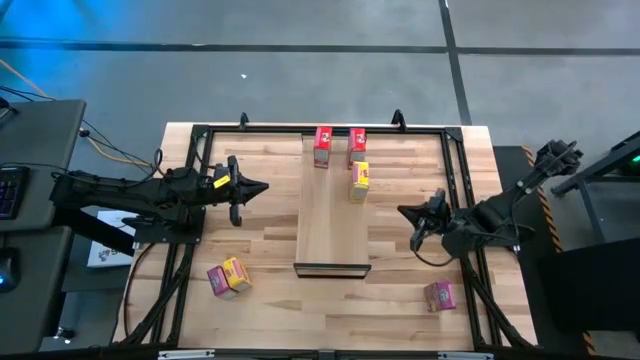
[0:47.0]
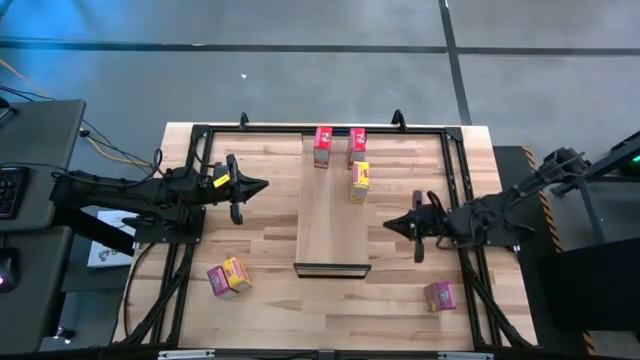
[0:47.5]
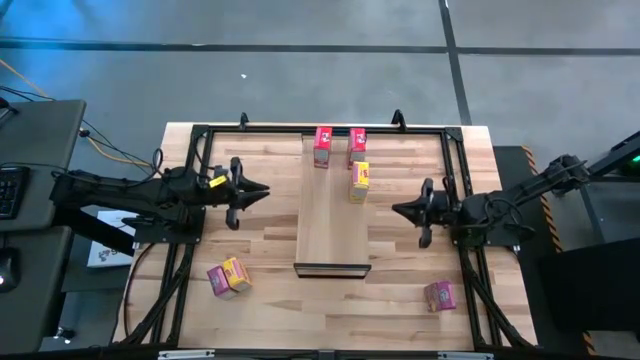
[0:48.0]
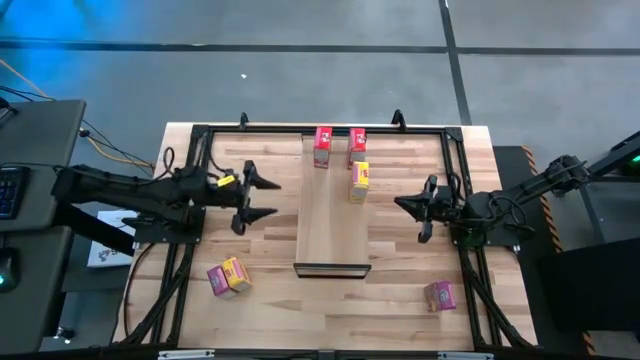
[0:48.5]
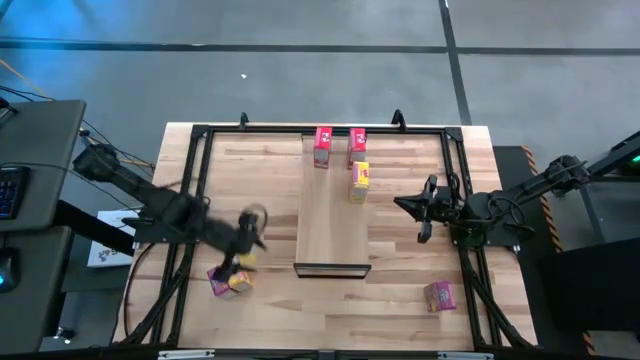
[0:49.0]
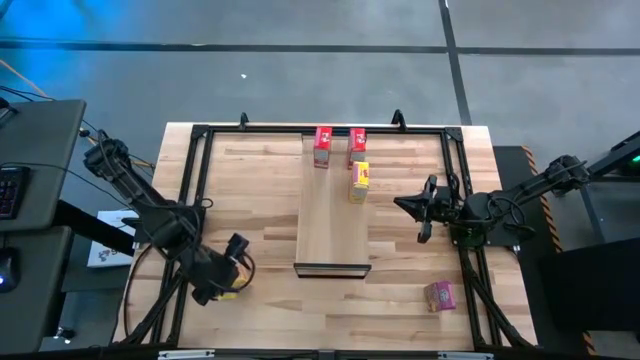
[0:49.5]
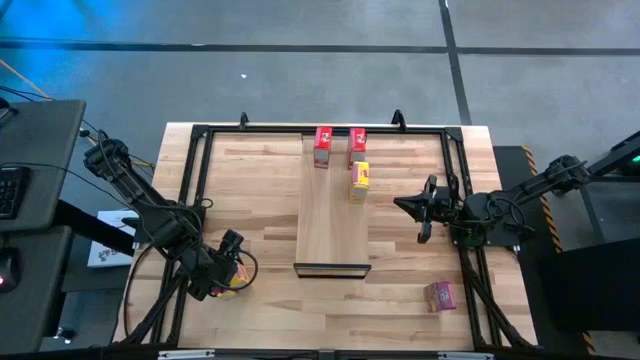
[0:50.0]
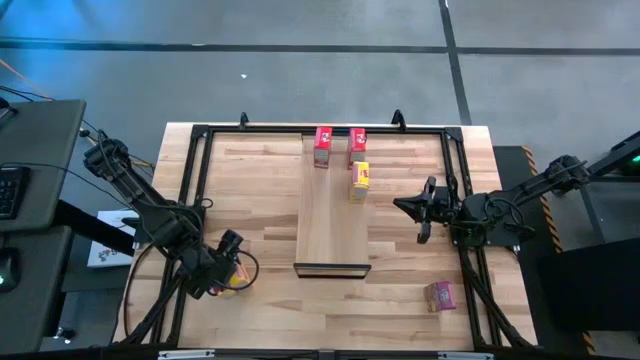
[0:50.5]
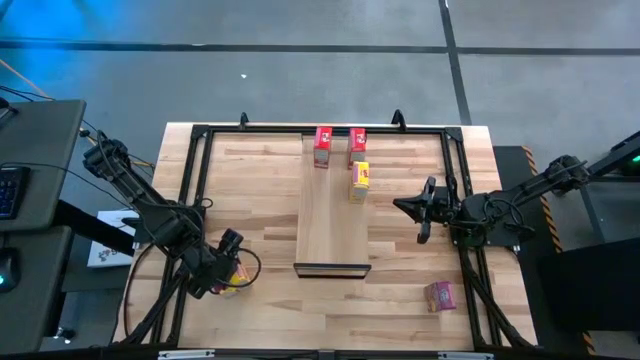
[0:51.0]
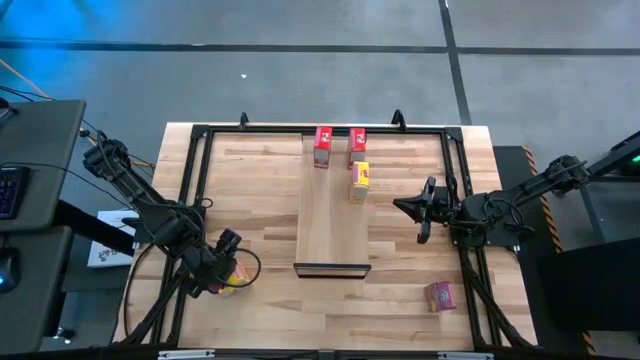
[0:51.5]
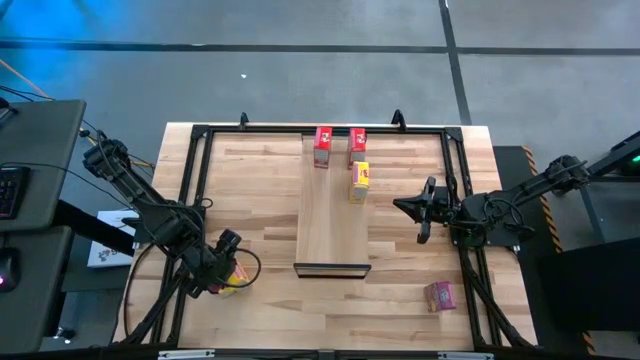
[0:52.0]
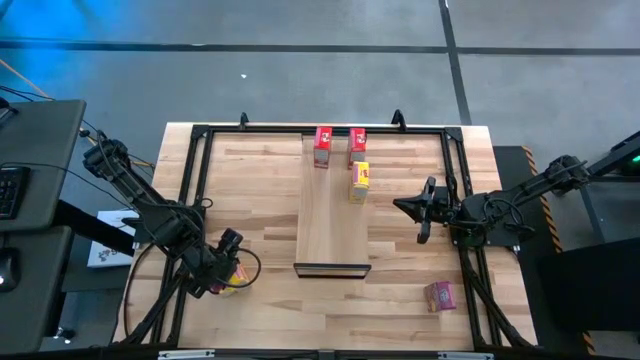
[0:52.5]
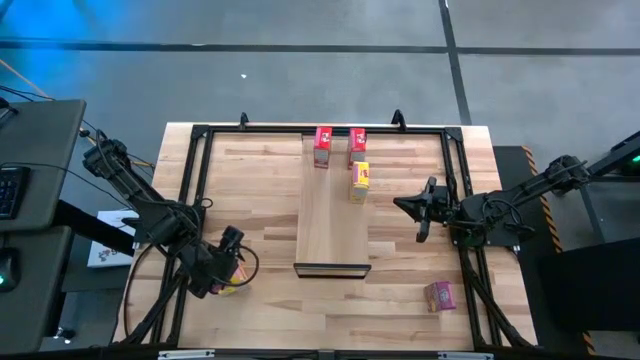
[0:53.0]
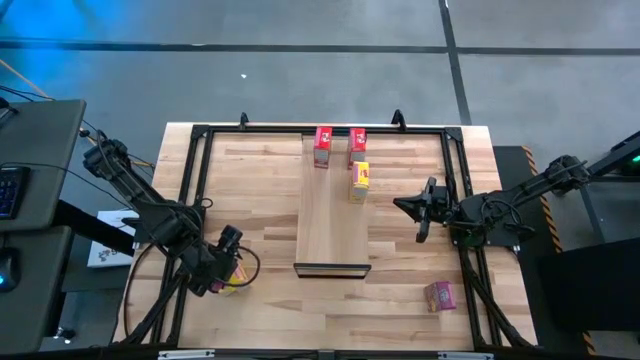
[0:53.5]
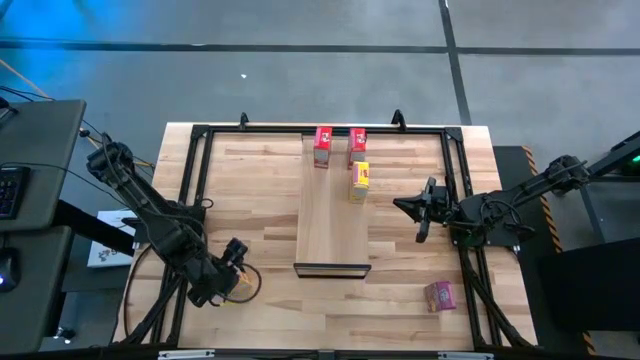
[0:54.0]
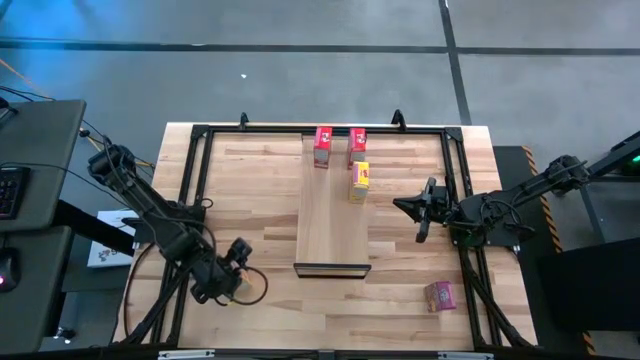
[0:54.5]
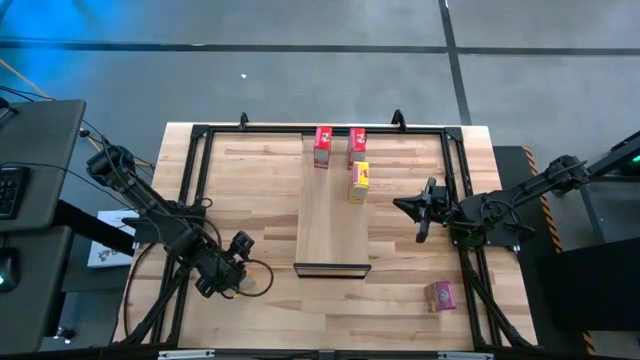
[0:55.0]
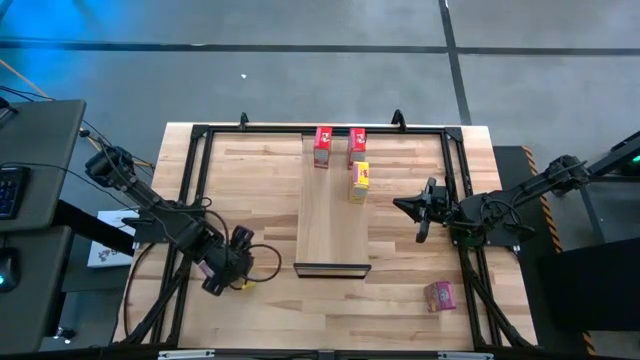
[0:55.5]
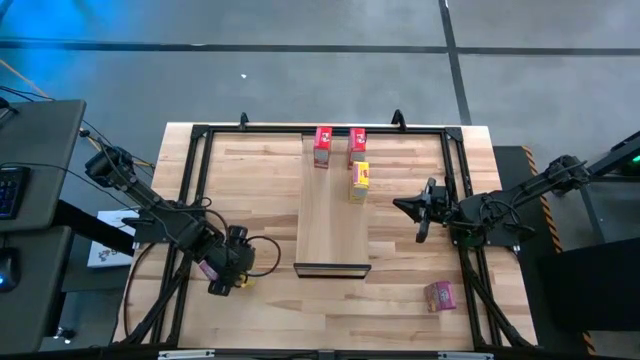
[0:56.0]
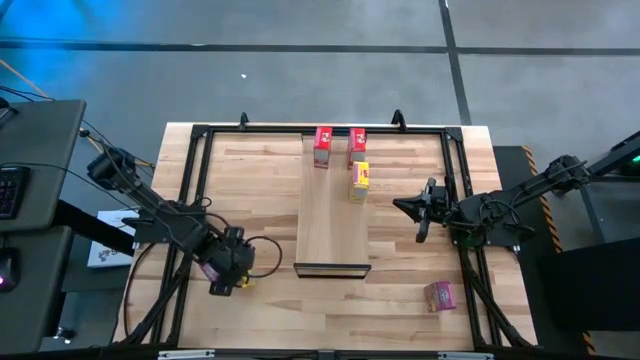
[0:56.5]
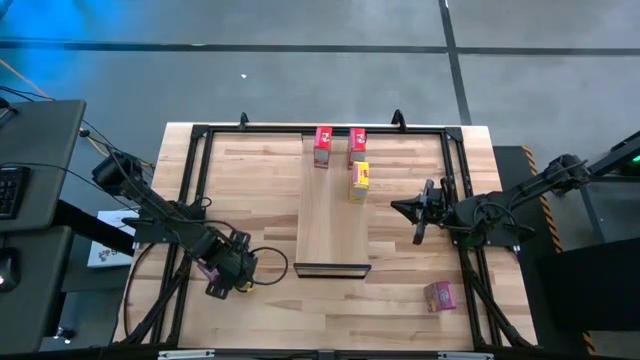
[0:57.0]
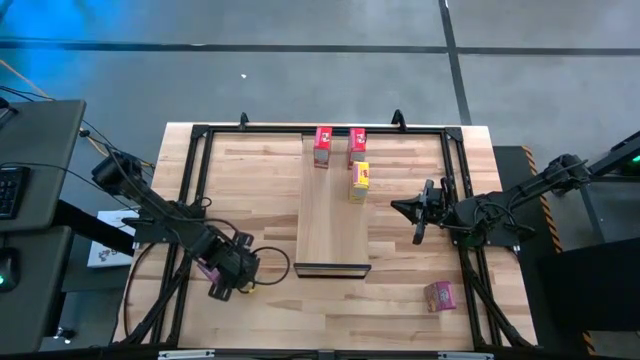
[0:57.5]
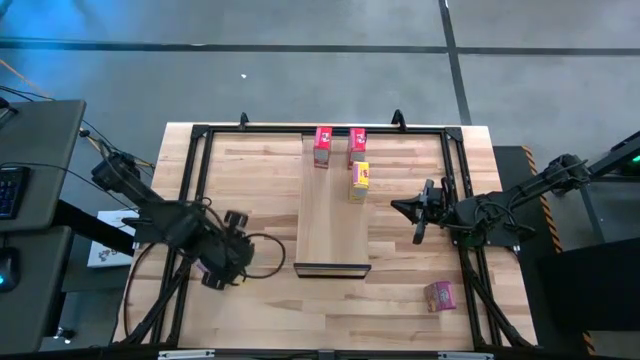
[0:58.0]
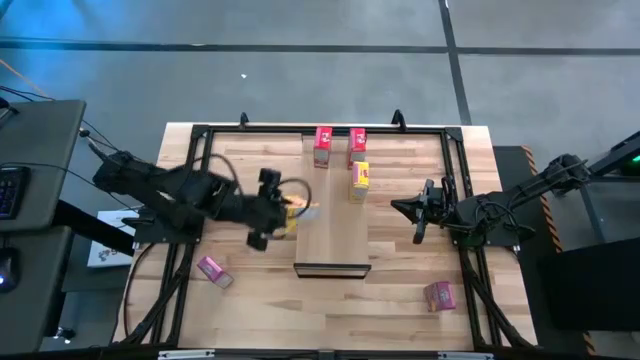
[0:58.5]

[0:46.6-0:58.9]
Task: Stack cereal on shelf
Put the yellow cereal box on the shelf aligned with the other yellow cereal box

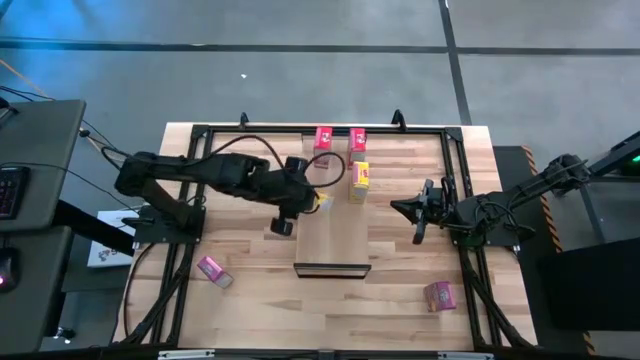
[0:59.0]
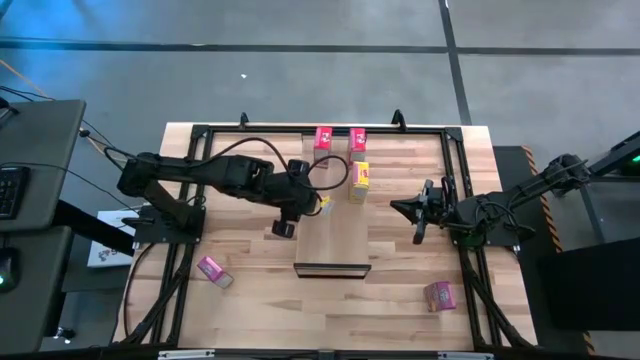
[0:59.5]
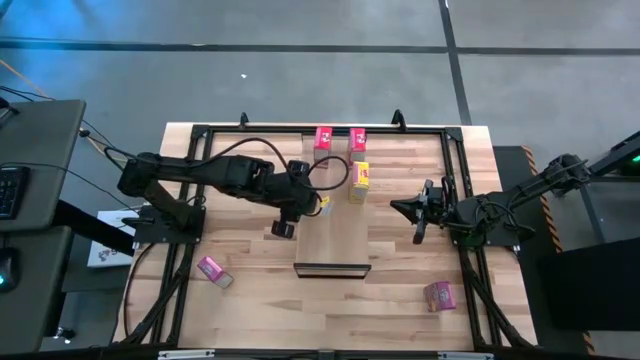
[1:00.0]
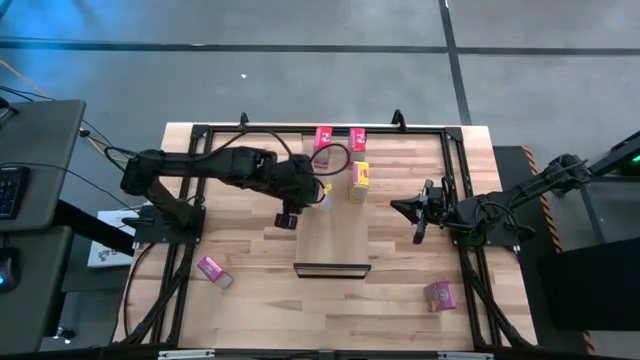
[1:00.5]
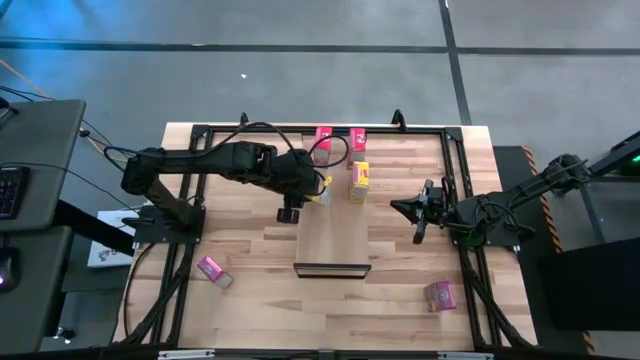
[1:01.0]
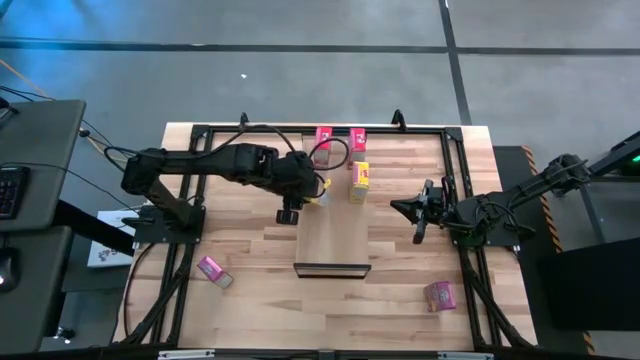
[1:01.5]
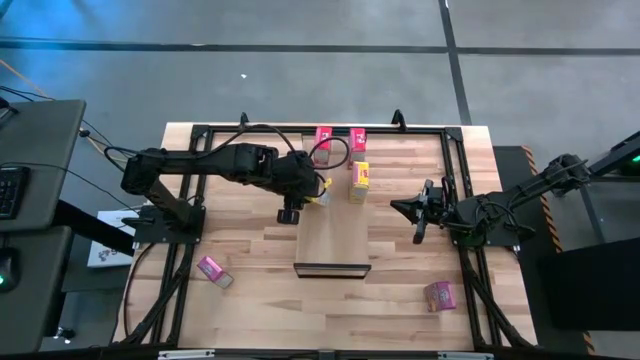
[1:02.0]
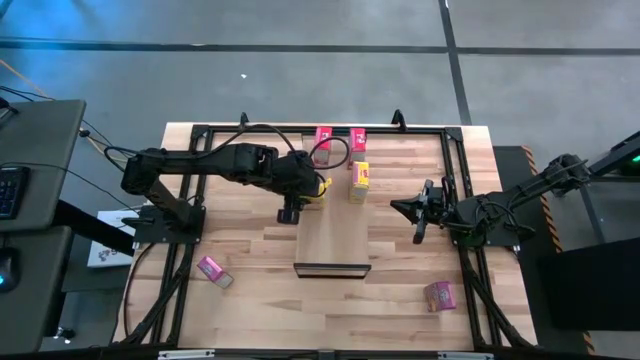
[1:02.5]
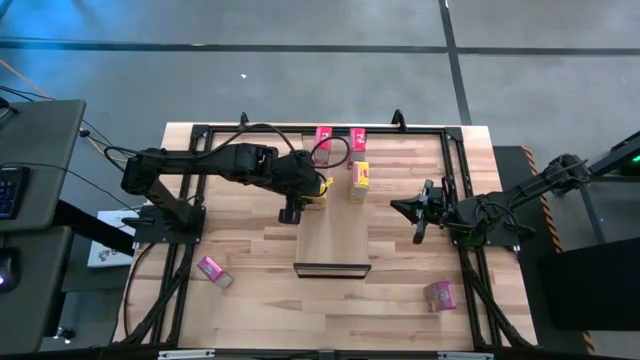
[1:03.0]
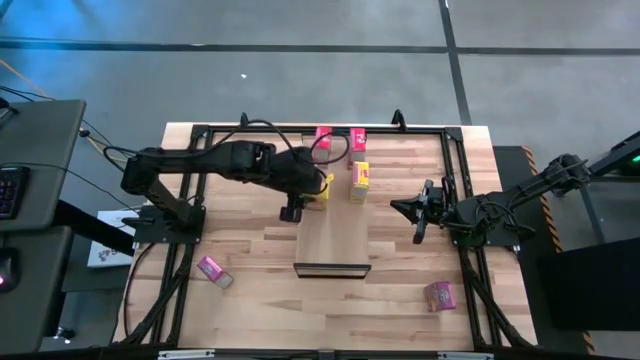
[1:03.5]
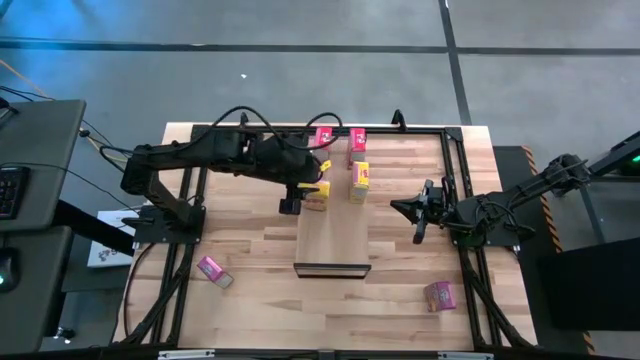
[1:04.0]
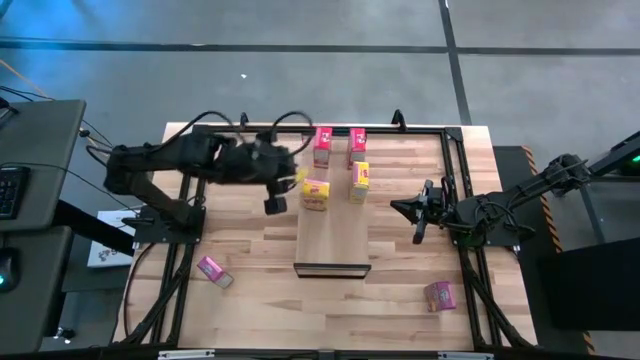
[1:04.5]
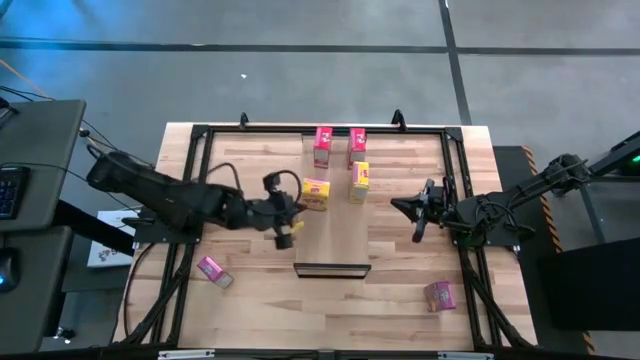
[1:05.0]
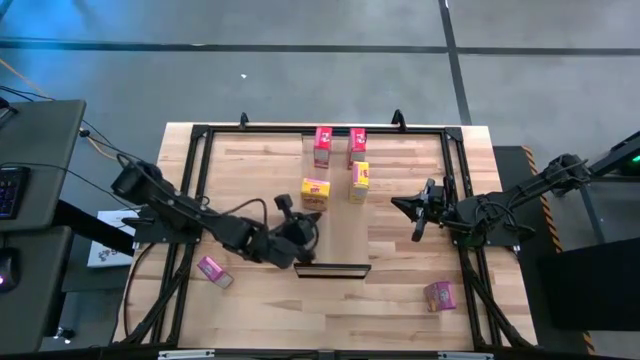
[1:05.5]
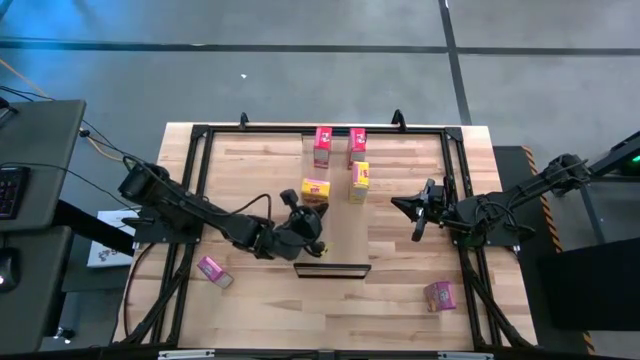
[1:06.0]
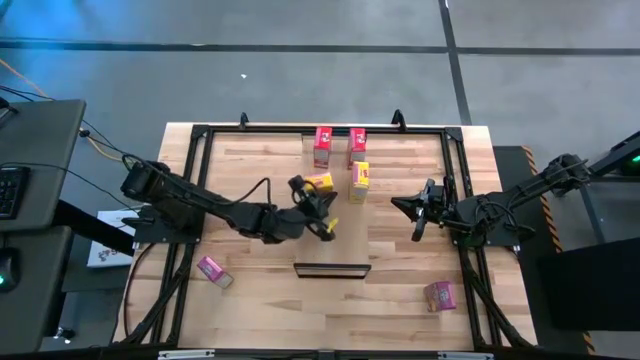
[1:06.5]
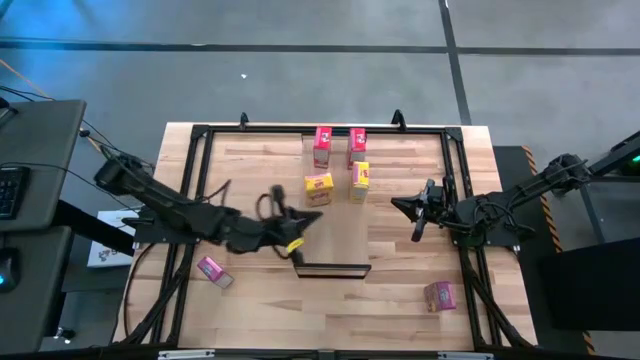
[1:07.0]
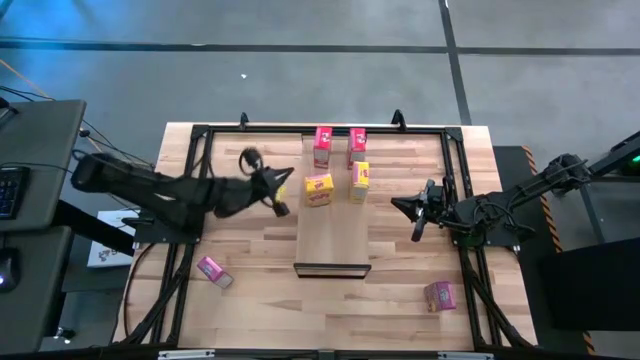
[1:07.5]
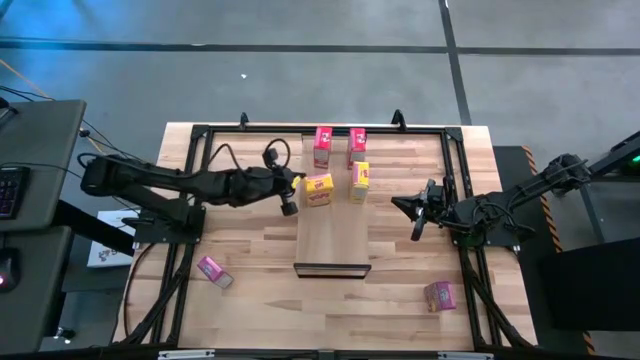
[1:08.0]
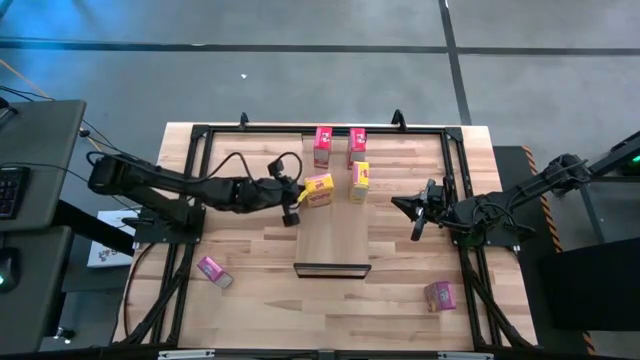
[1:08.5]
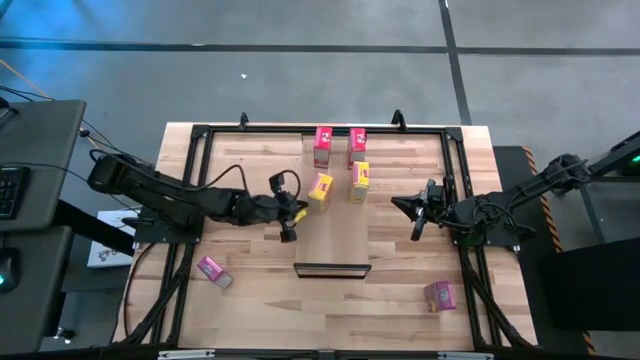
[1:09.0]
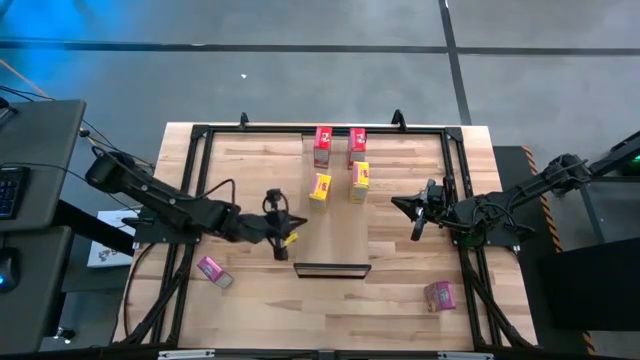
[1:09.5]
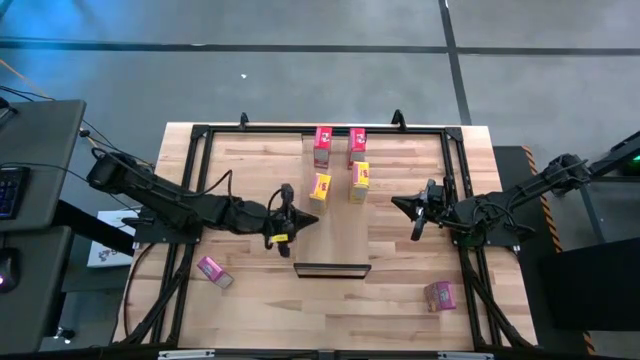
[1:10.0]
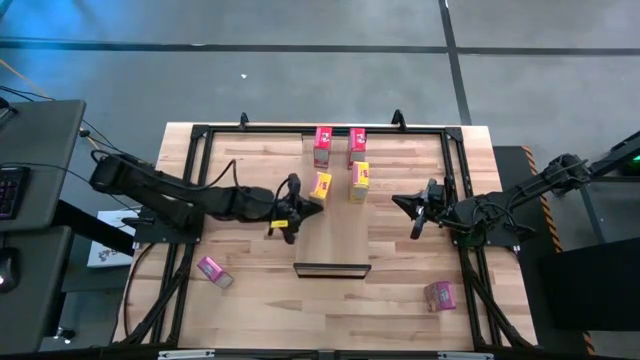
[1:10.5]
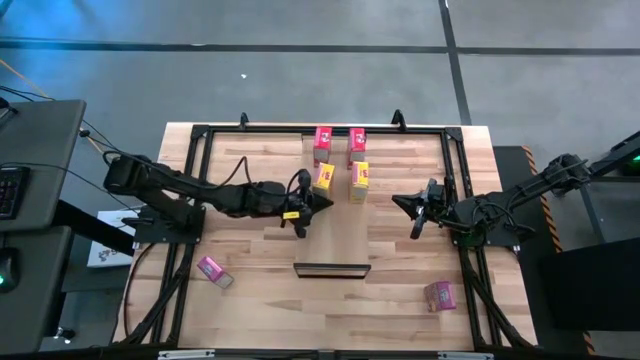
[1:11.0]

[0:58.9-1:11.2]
Put the yellow cereal box on the shelf aligned with the other yellow cereal box
